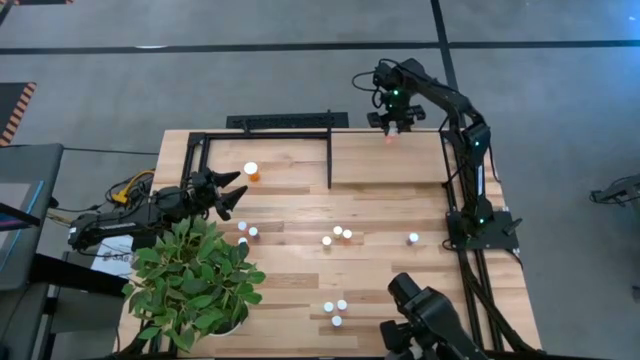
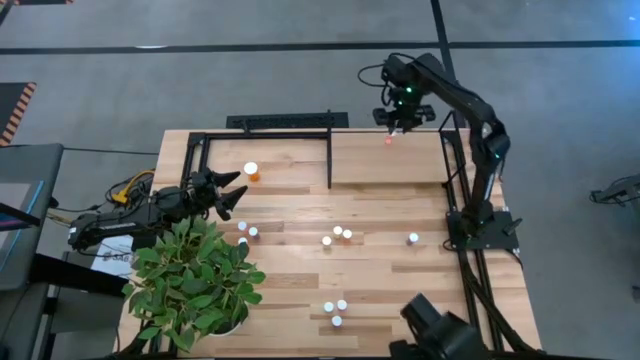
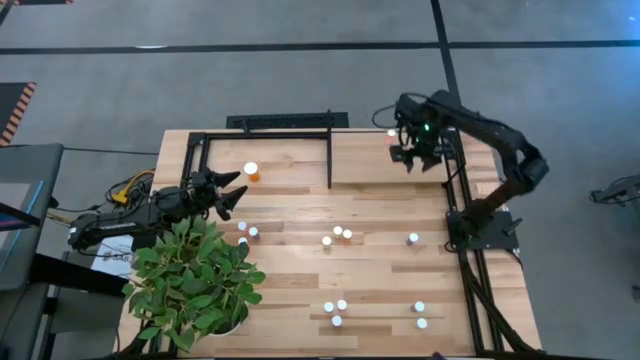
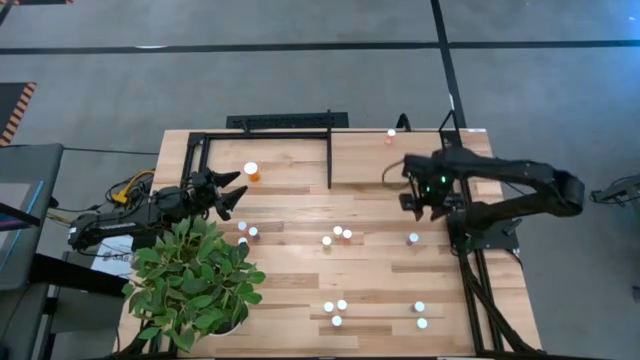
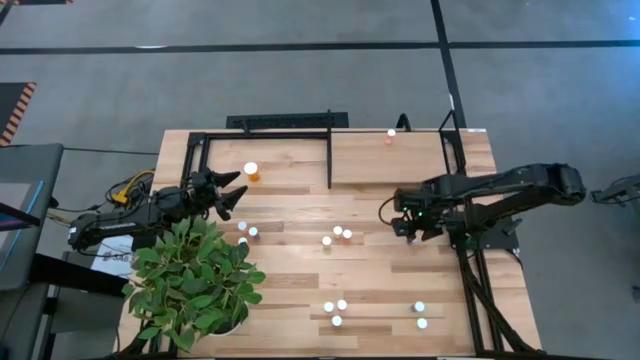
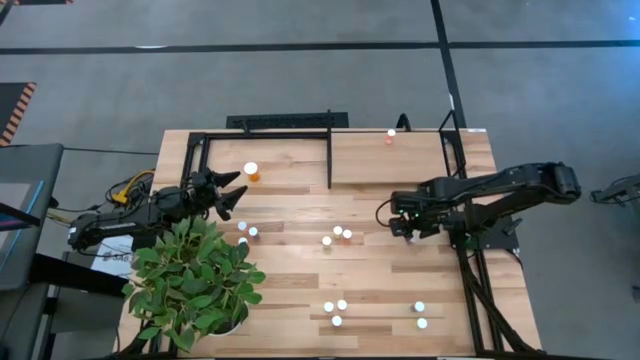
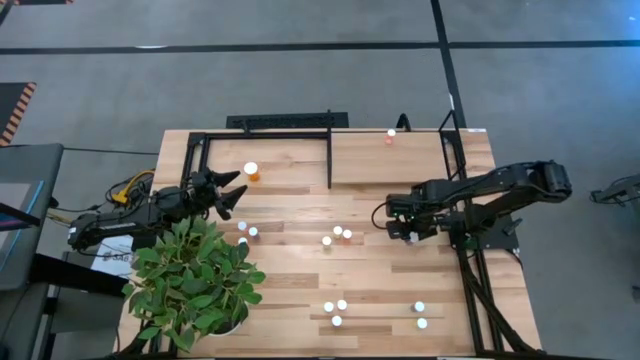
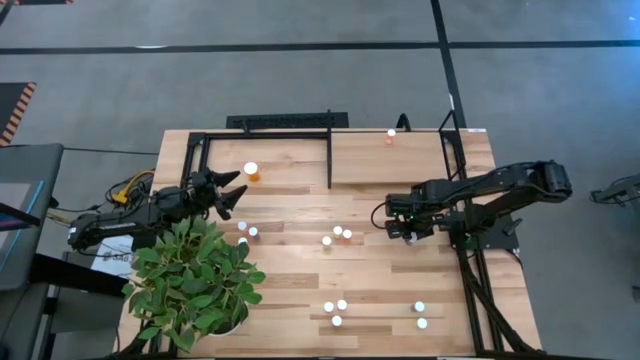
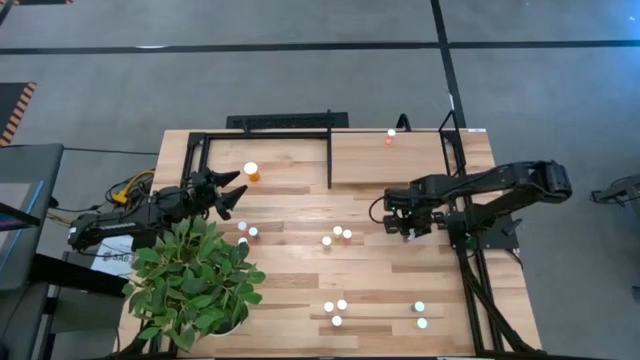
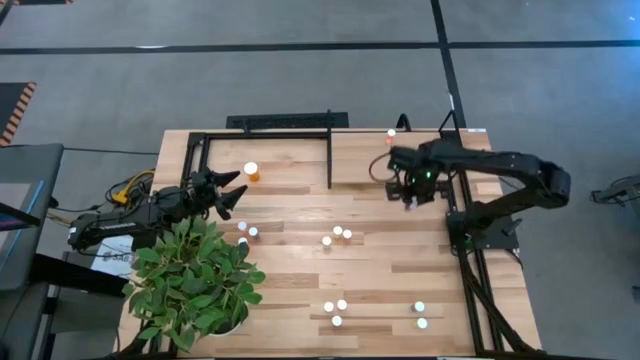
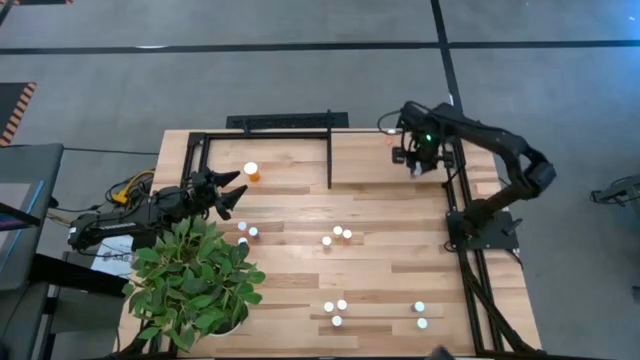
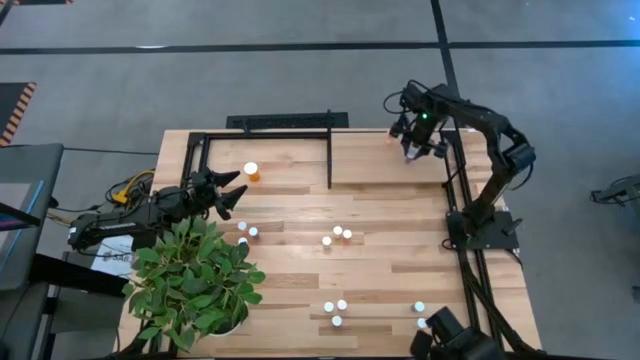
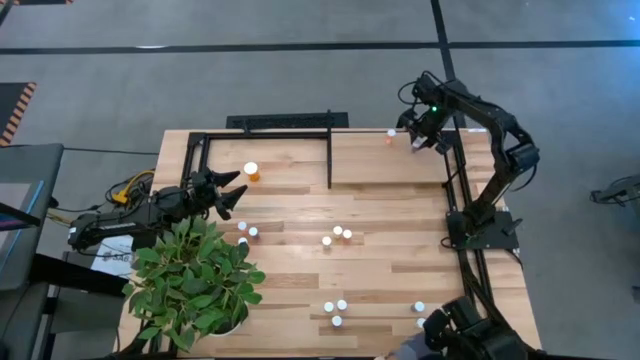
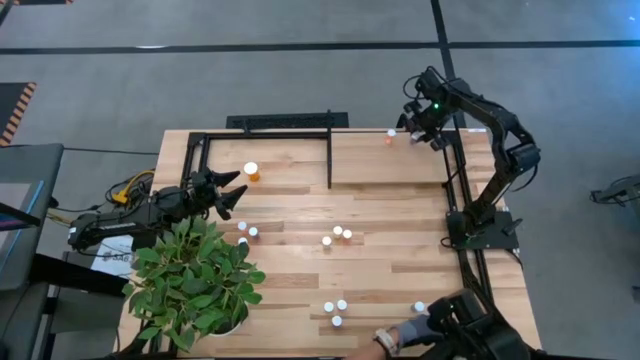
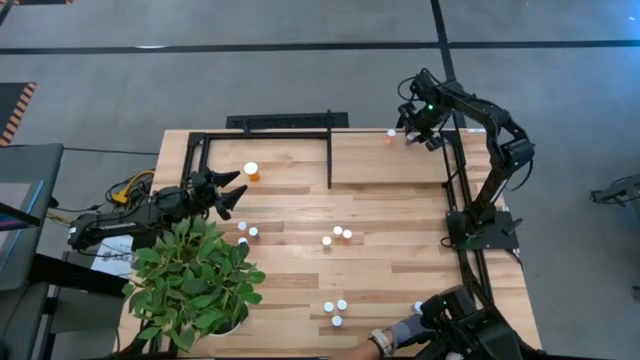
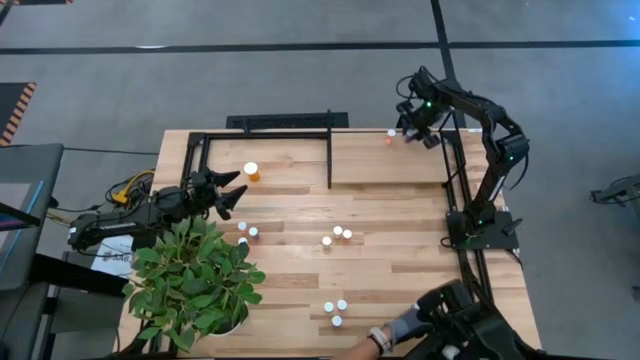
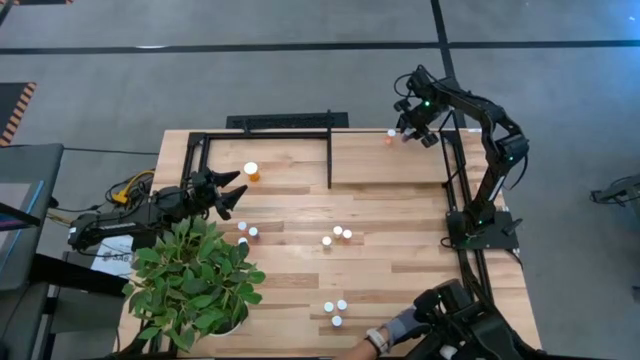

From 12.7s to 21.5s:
Task: Pick and place medicine bottles onto shelf by color
Put the blue pill bottle on the shelf

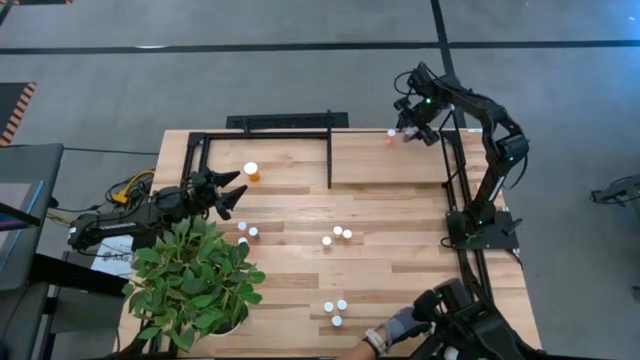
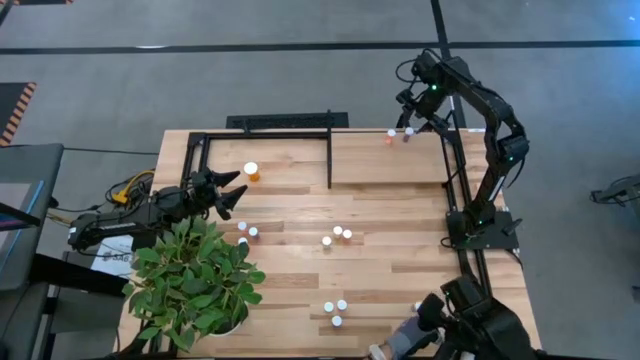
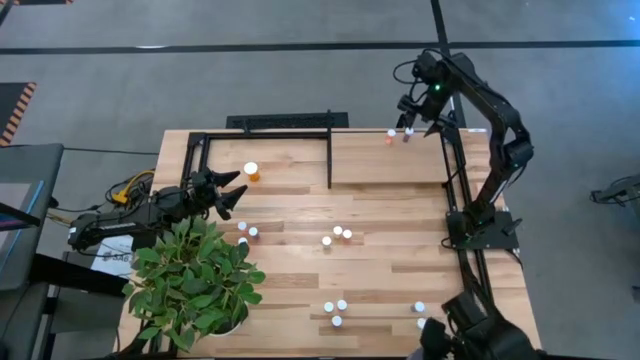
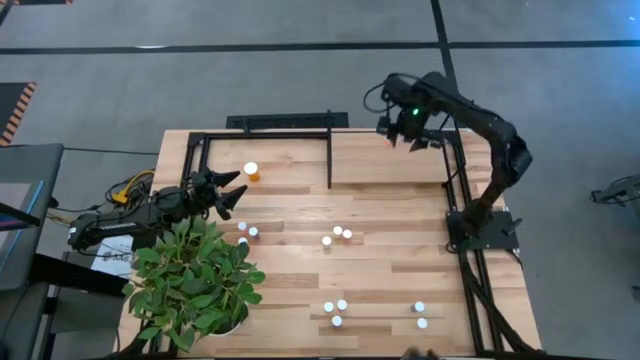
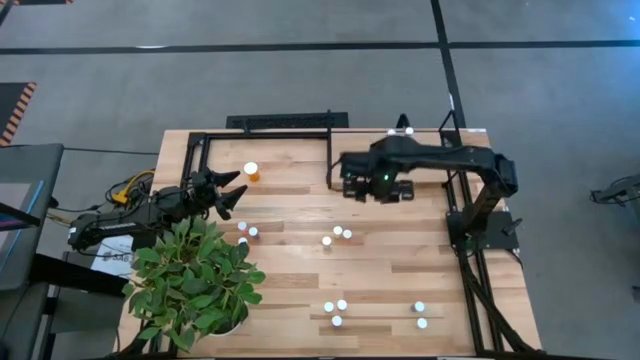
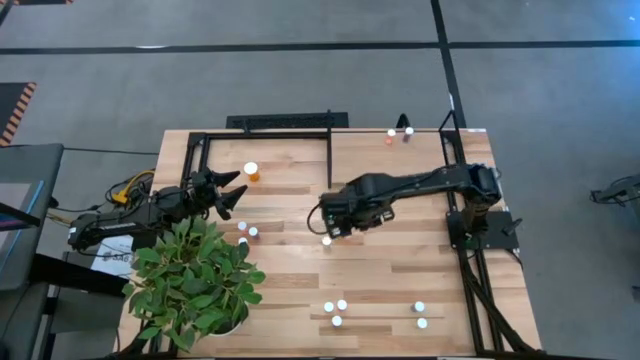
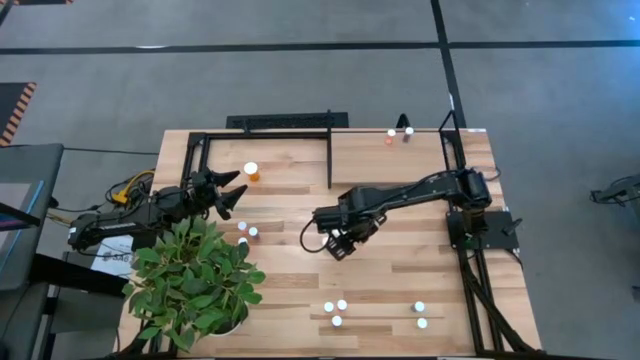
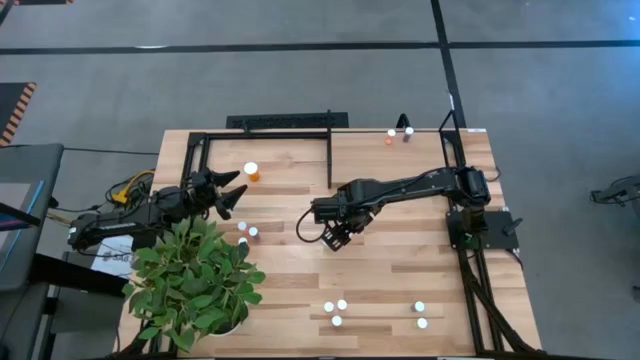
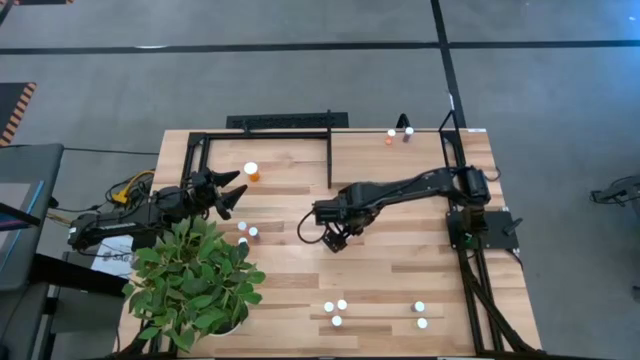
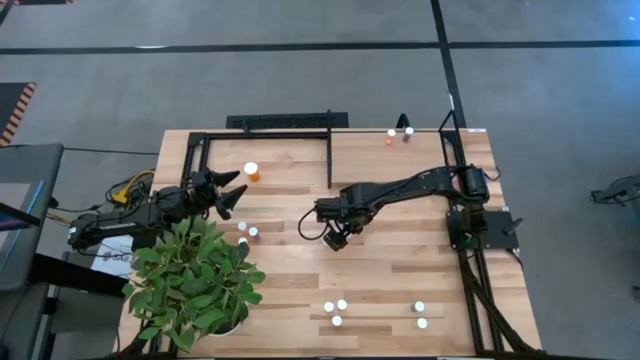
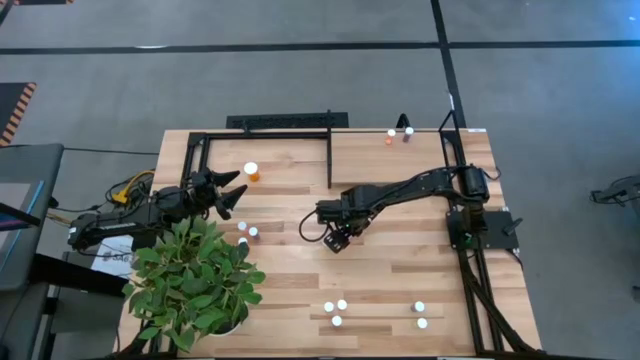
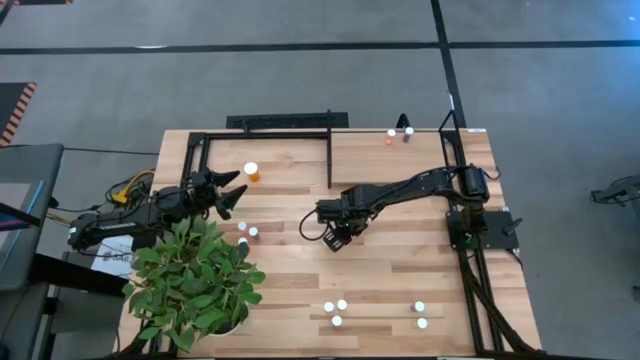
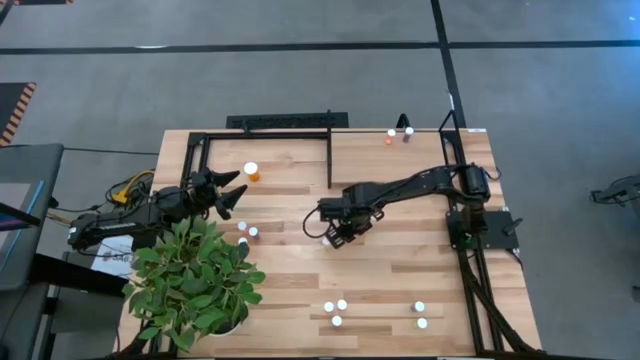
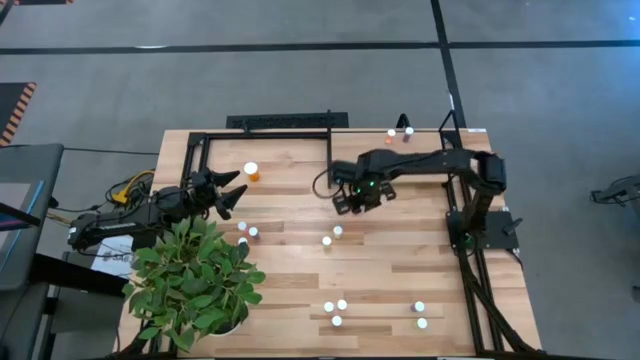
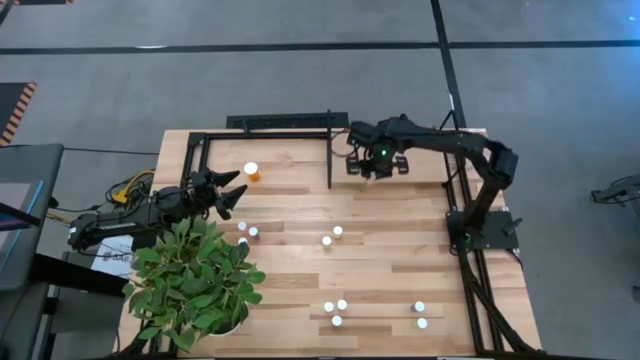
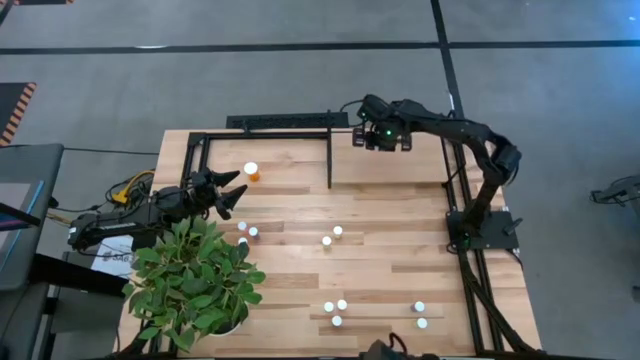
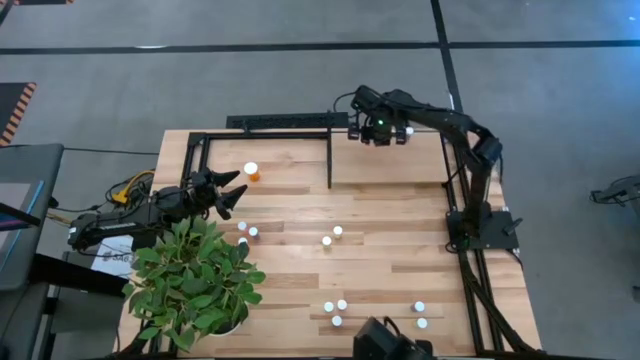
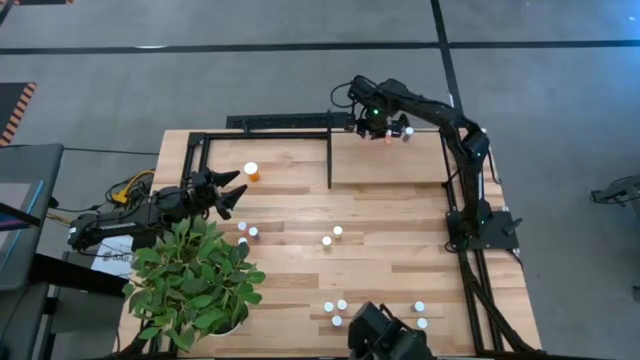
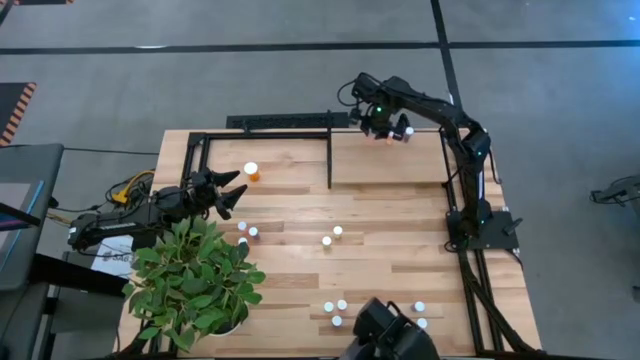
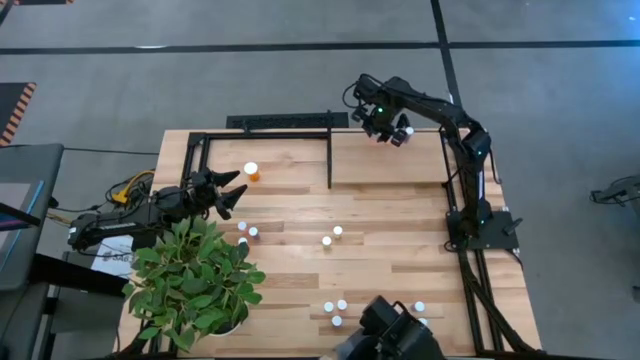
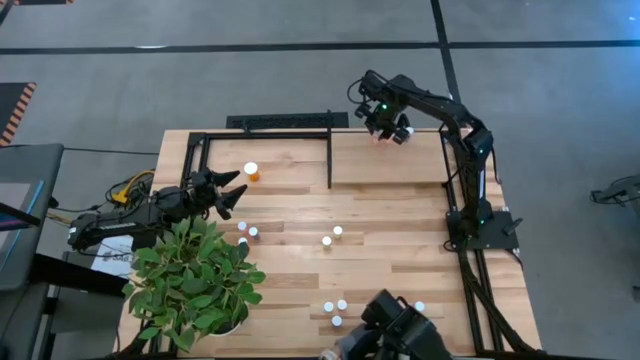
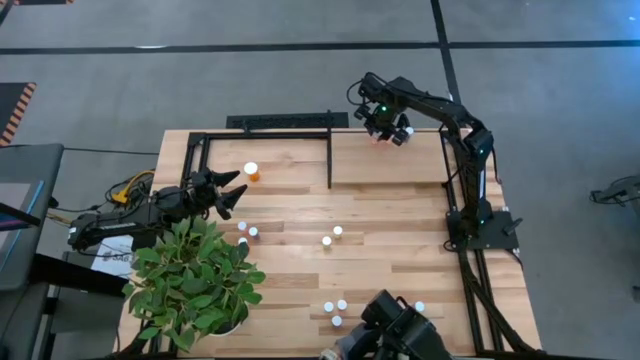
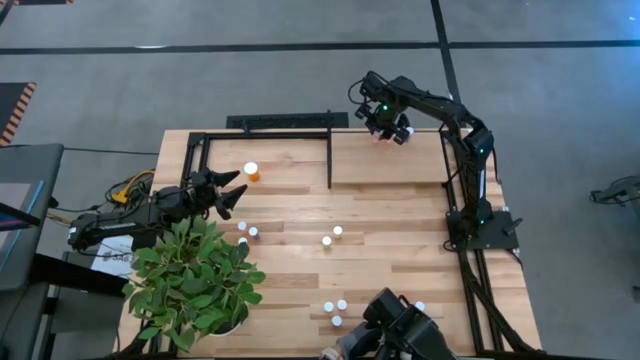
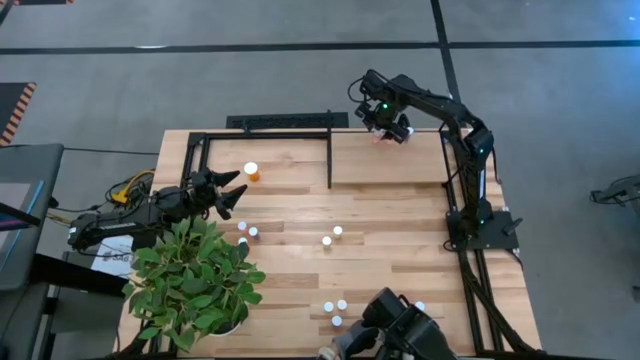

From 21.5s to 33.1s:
Put the pink pill bottle on the shelf

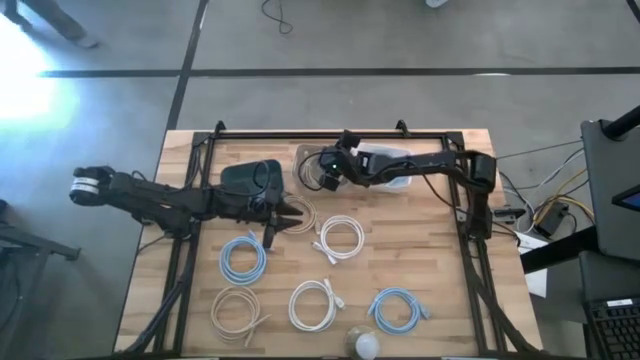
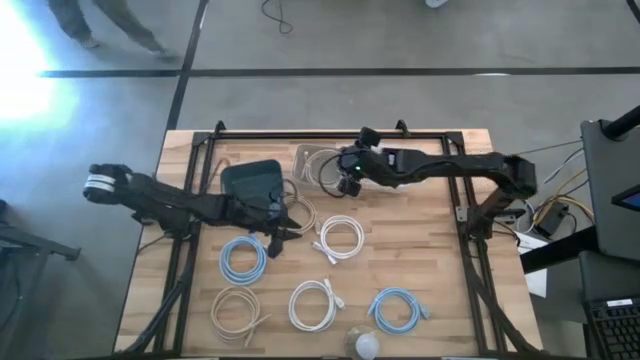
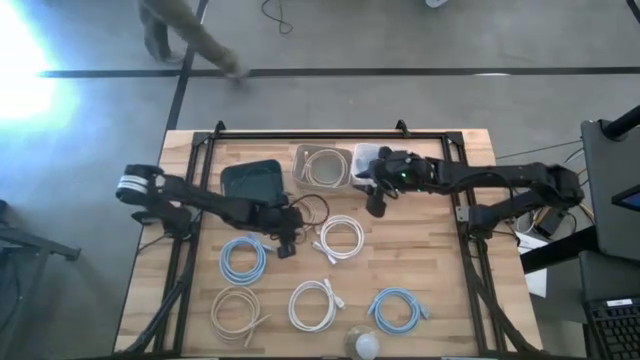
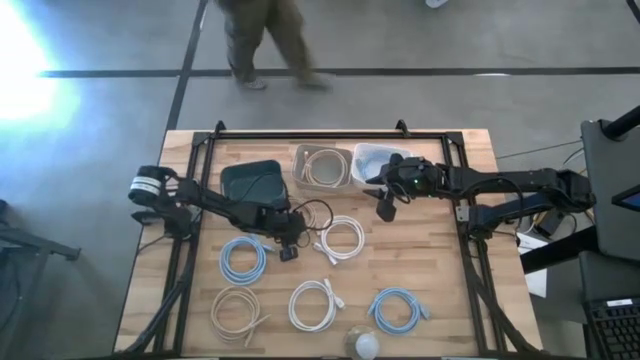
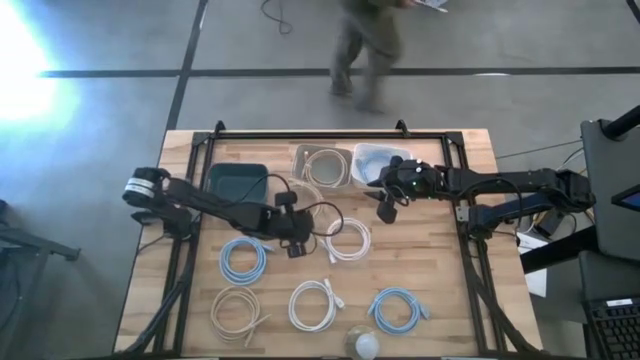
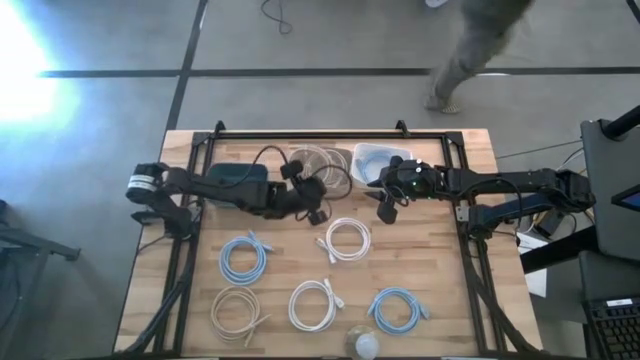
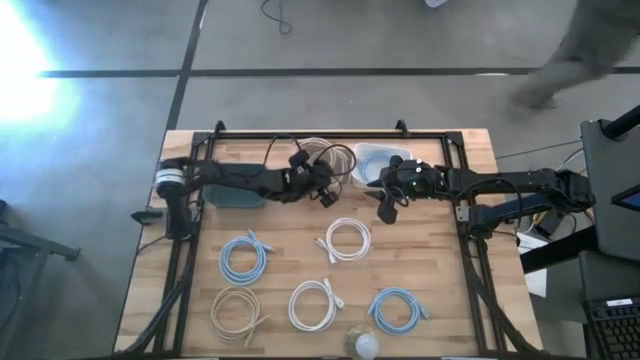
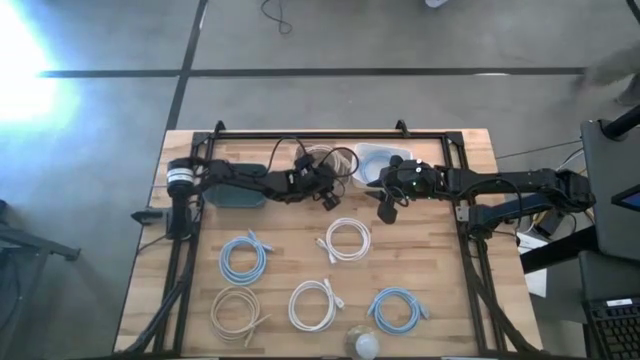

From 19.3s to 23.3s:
Task: Pick & Place USB Port
Put the top brown USB cable into the gray bin
